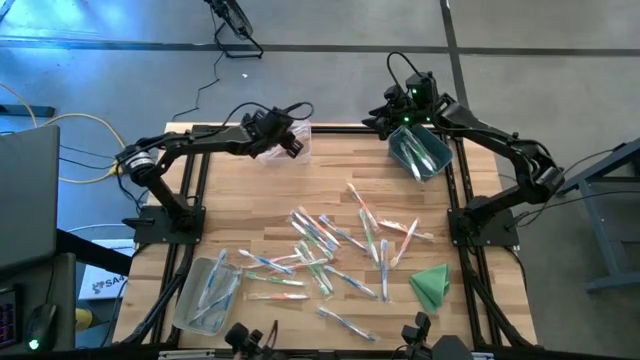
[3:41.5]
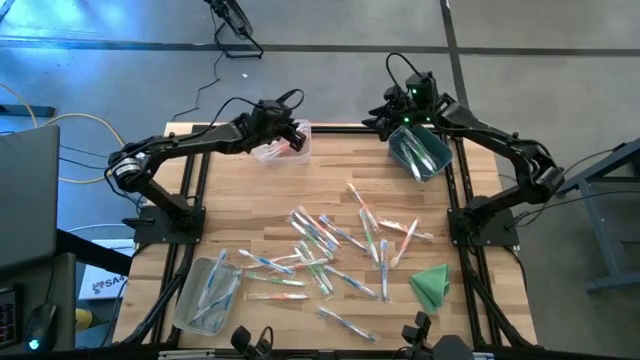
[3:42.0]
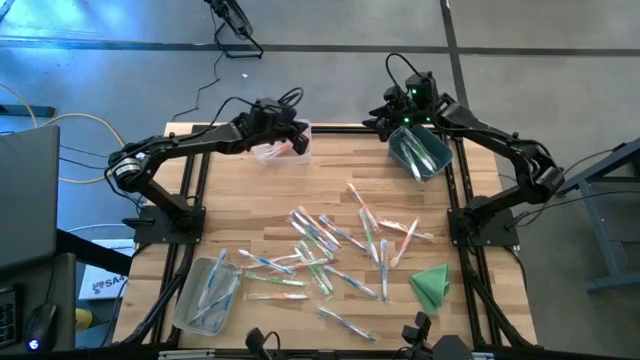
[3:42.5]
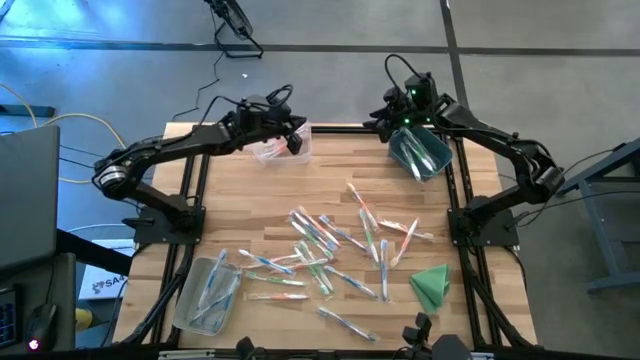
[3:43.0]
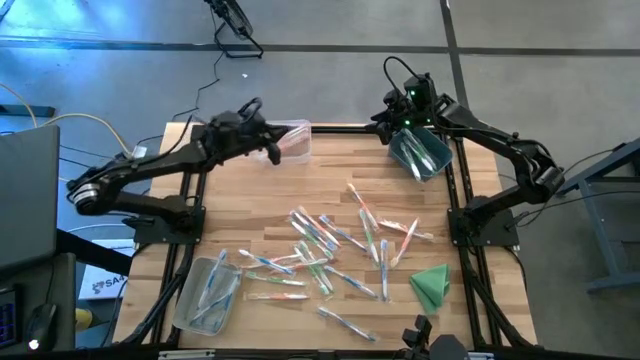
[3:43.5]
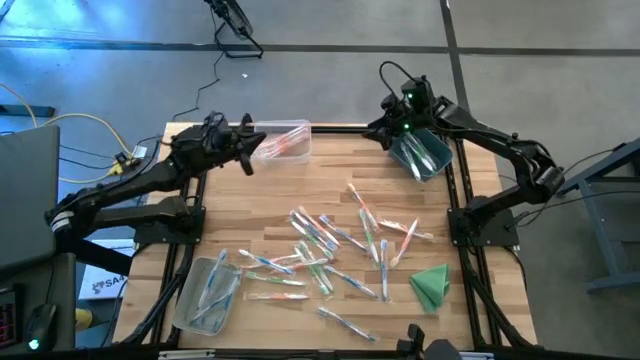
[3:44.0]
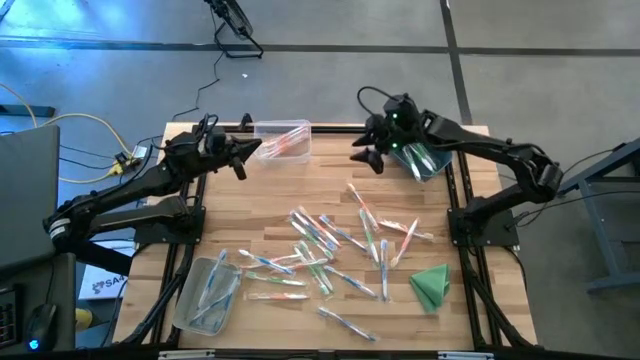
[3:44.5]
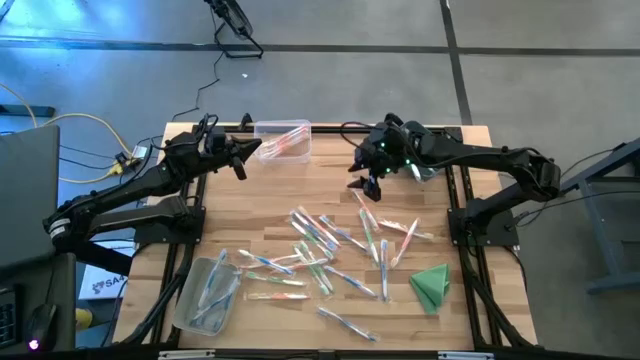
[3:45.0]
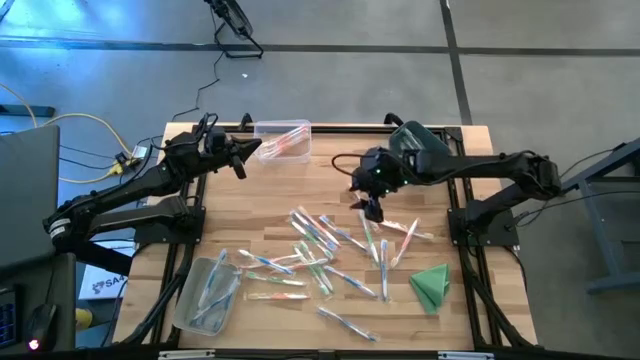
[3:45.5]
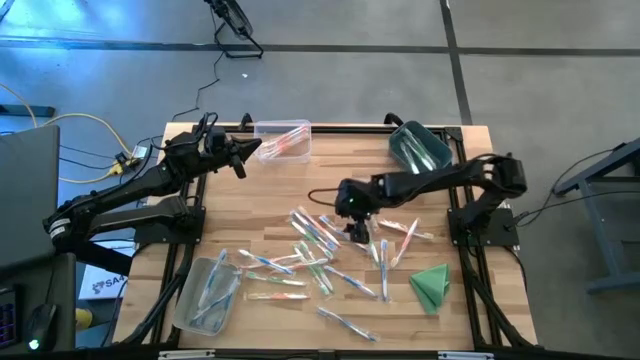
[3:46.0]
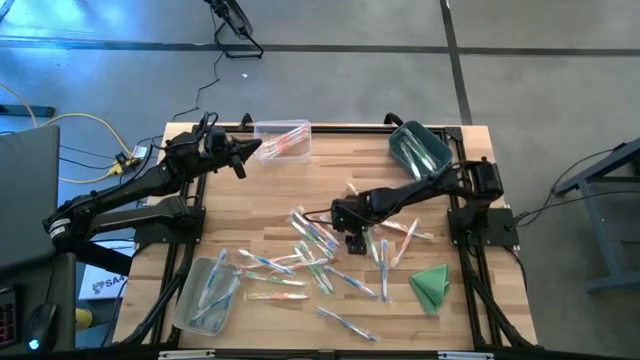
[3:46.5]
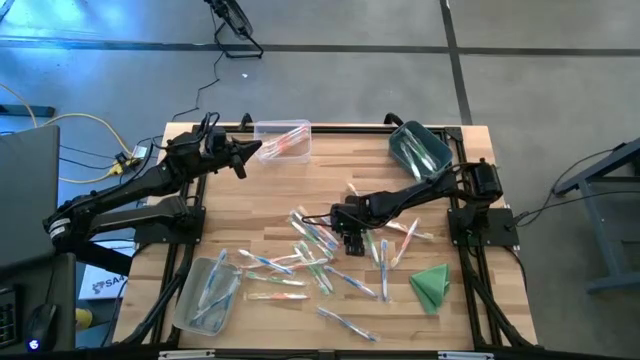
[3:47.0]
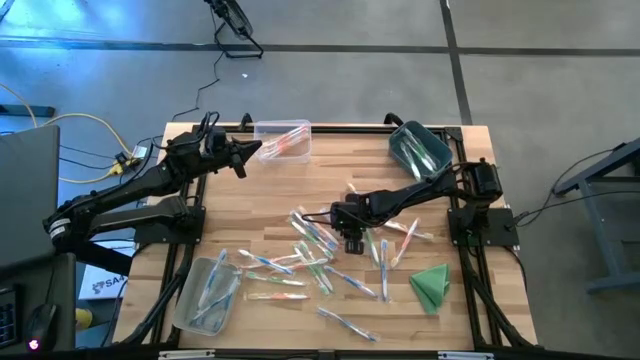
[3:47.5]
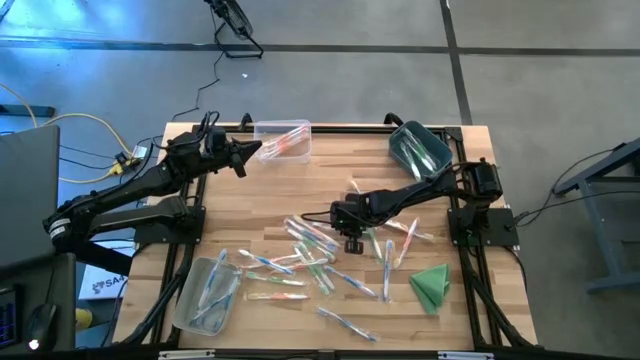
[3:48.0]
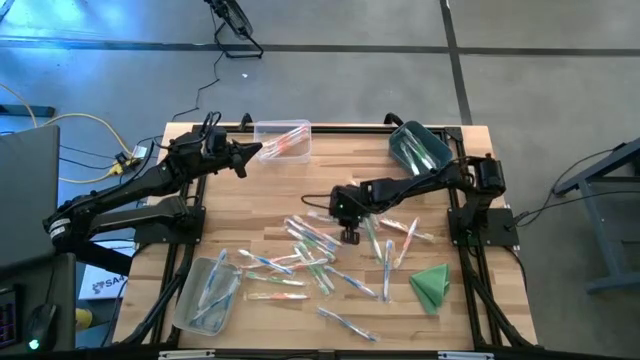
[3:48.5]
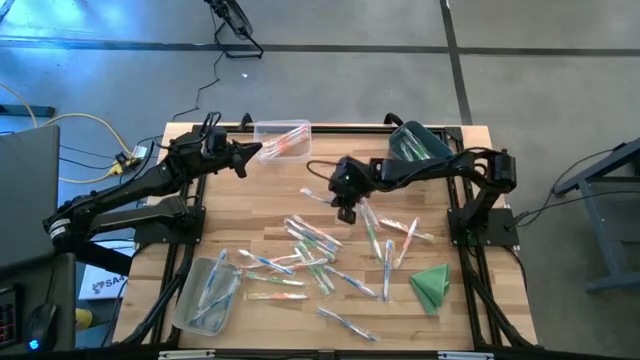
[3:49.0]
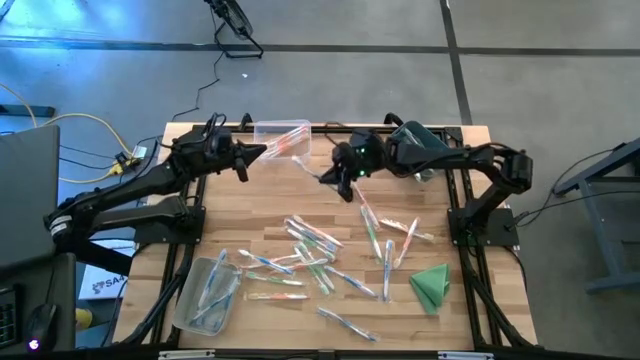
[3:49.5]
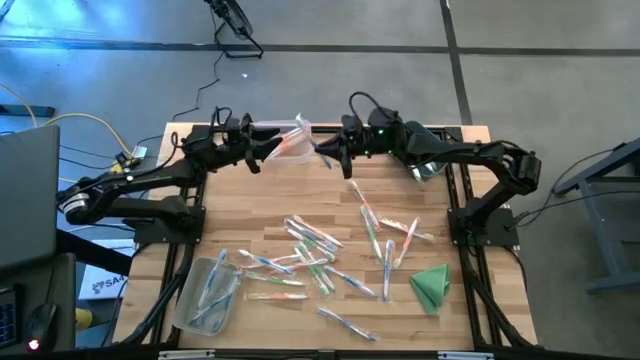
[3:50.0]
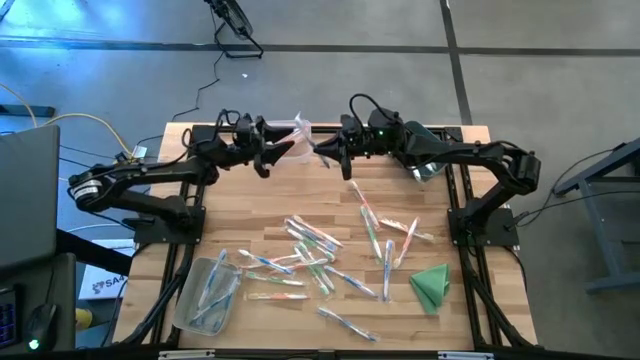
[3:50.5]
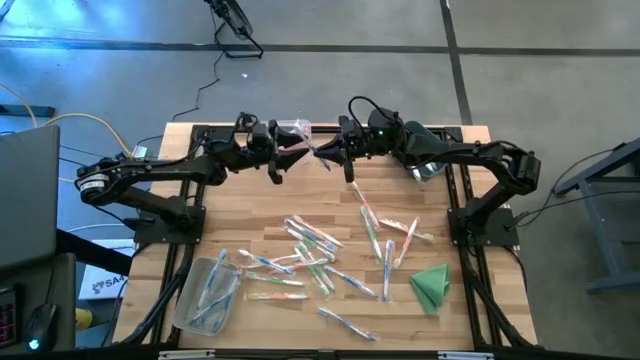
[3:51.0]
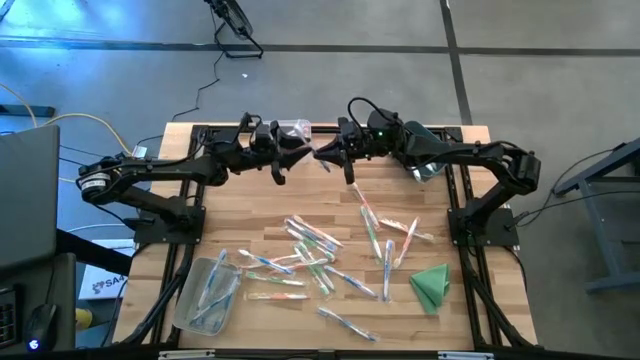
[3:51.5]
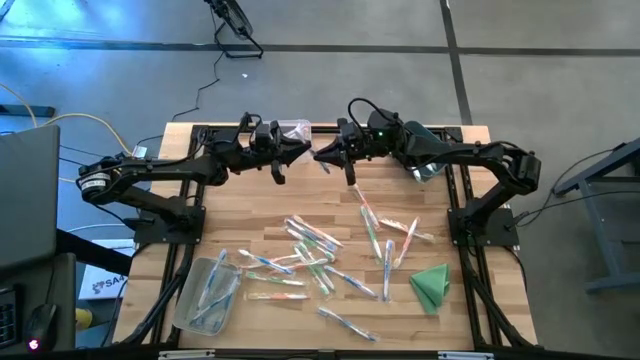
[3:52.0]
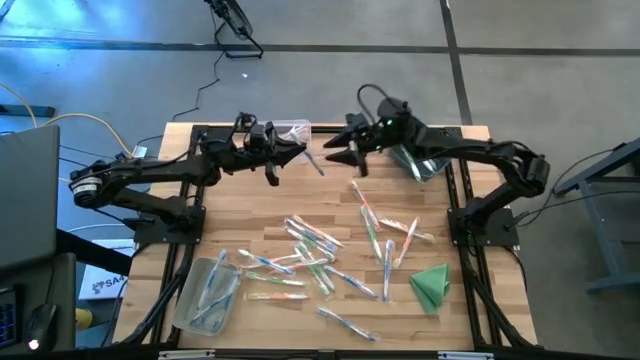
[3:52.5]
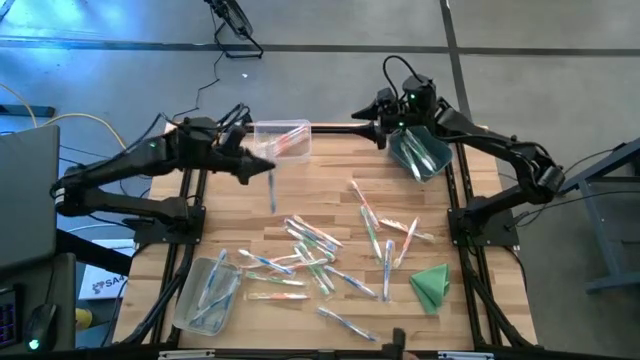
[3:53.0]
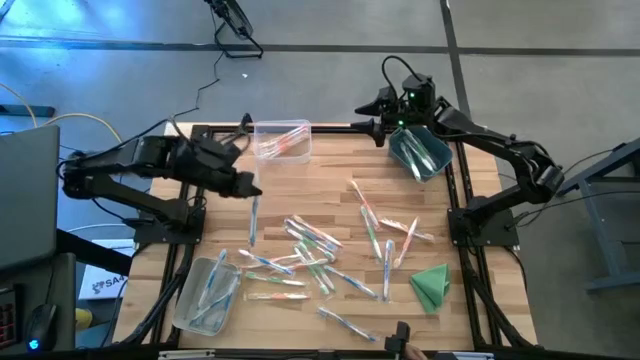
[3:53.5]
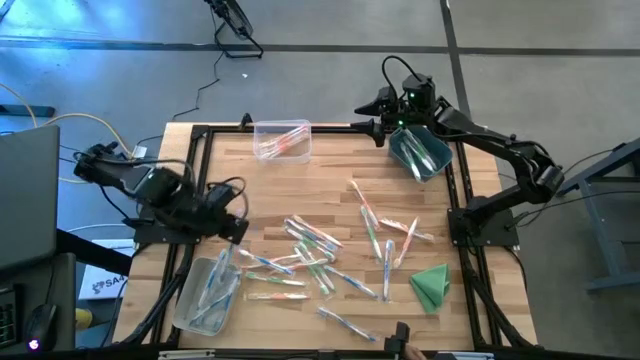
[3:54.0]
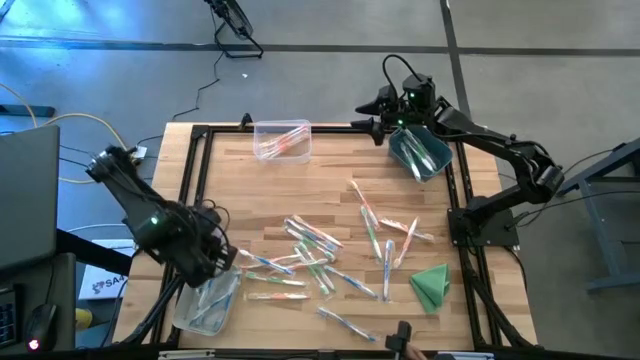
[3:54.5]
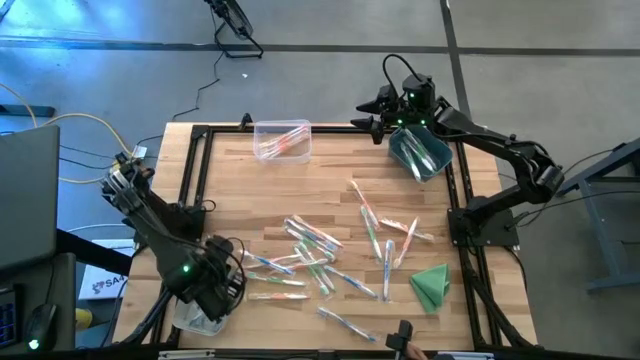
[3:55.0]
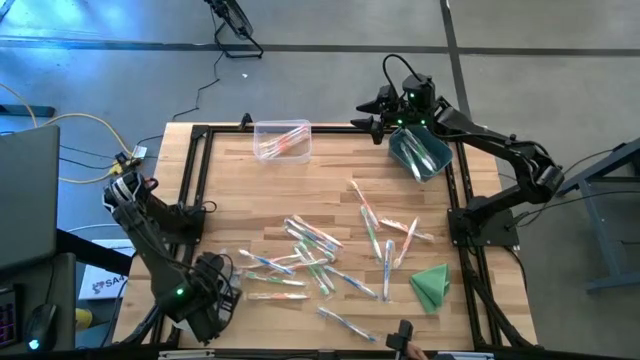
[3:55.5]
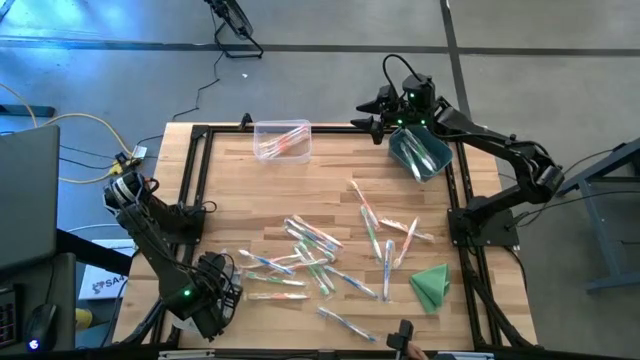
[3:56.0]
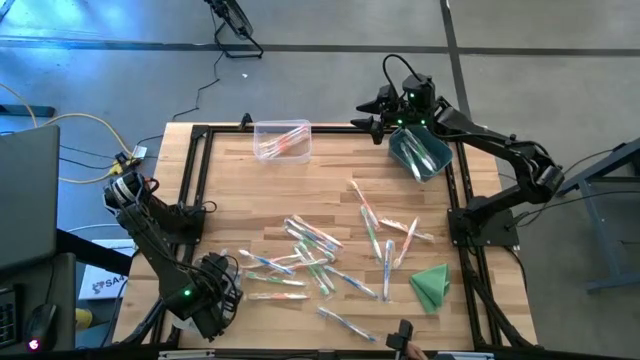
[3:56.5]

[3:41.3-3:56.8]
Task: Pick & Place Toothbrushes
Put the blue toothbrush into the gray bin
